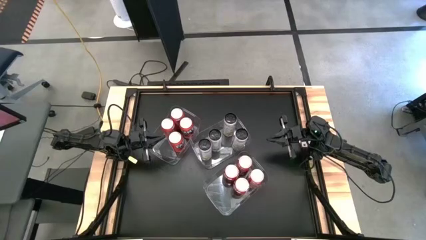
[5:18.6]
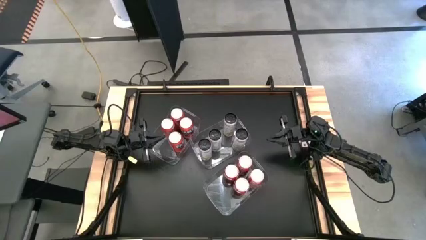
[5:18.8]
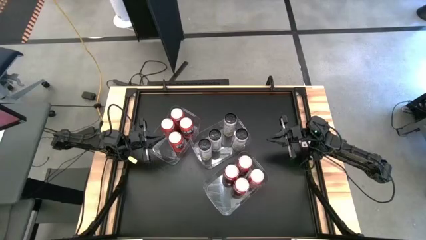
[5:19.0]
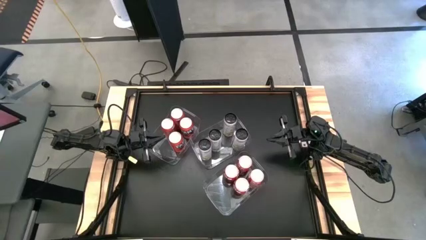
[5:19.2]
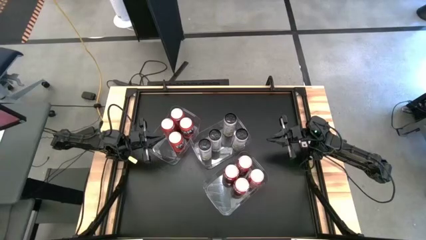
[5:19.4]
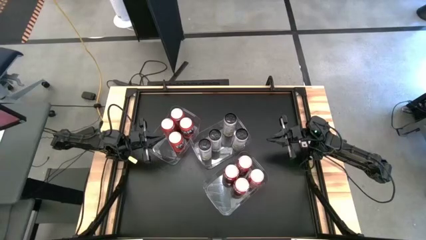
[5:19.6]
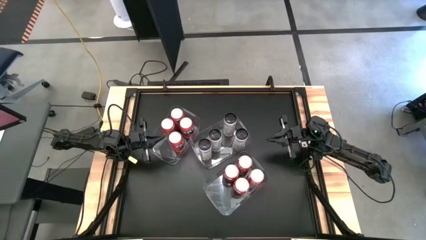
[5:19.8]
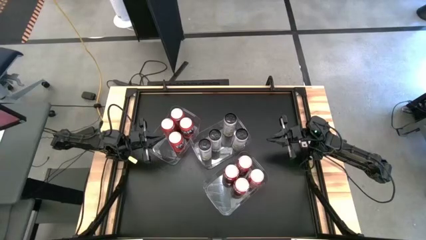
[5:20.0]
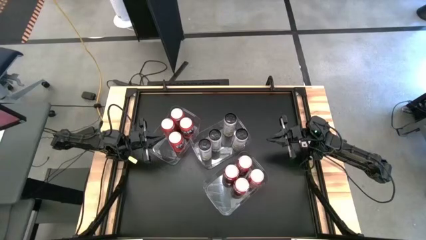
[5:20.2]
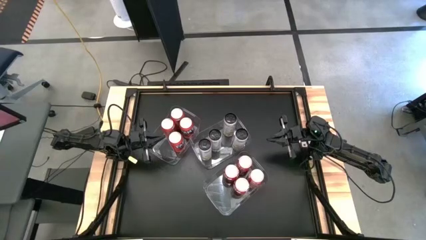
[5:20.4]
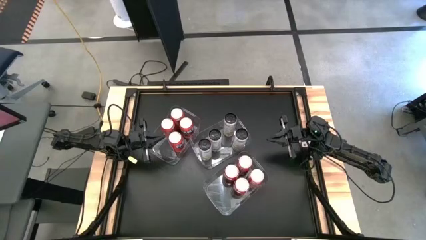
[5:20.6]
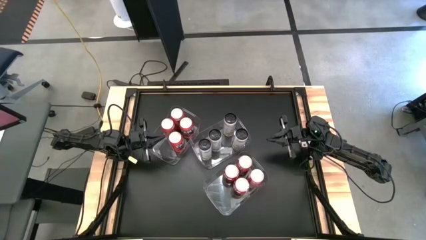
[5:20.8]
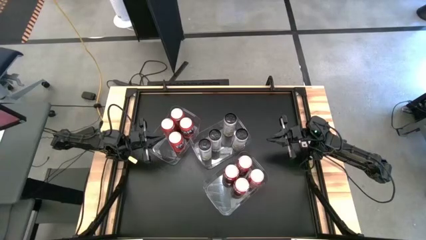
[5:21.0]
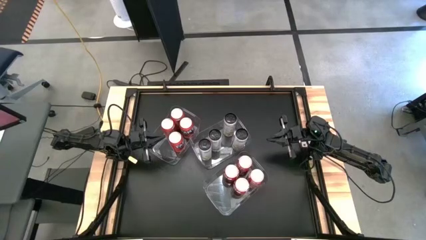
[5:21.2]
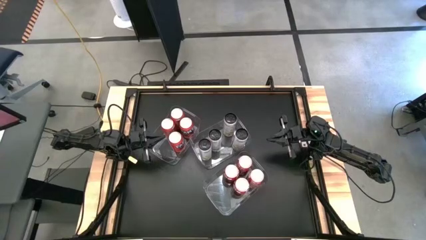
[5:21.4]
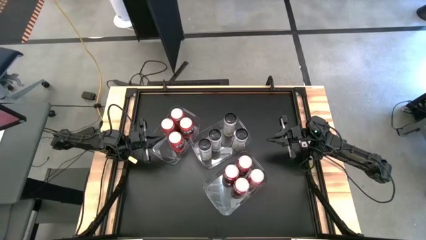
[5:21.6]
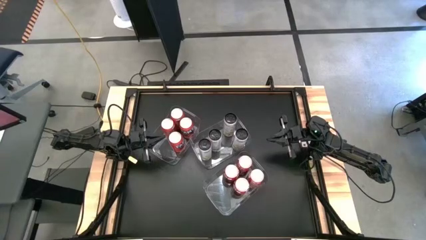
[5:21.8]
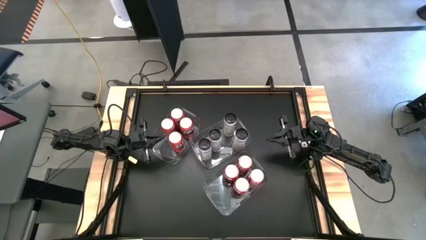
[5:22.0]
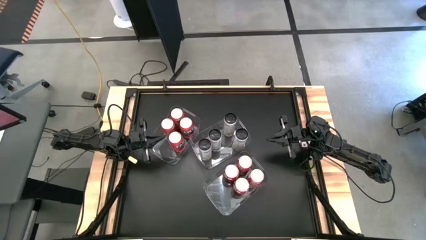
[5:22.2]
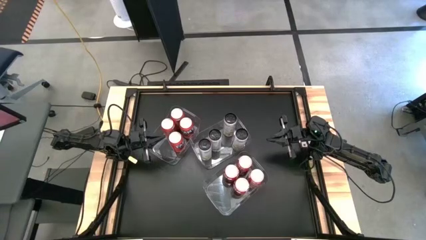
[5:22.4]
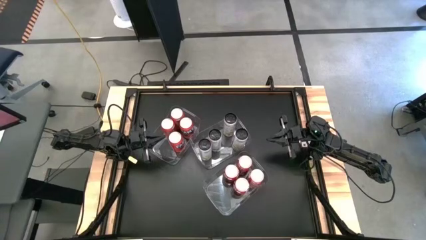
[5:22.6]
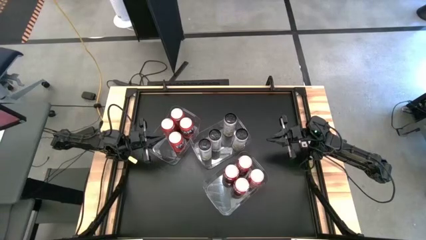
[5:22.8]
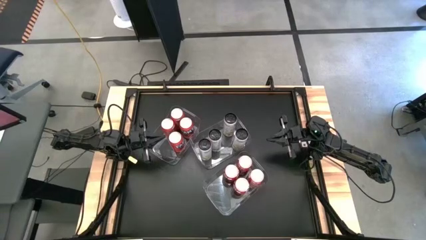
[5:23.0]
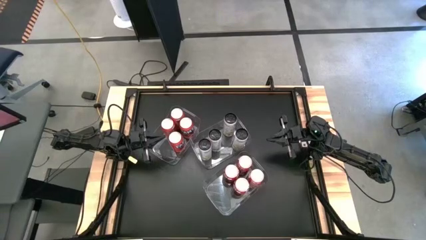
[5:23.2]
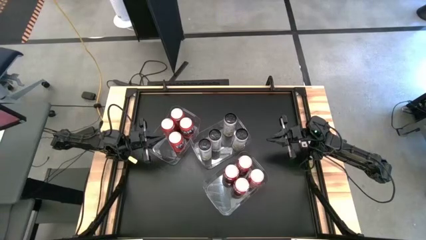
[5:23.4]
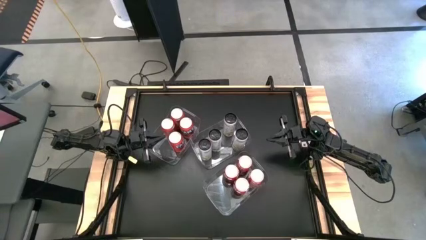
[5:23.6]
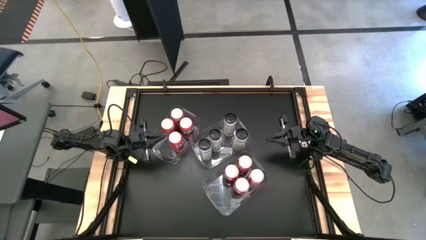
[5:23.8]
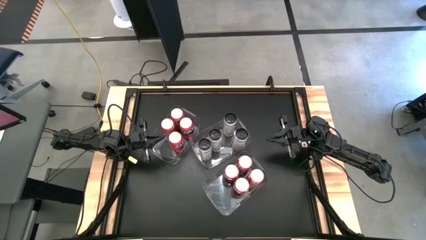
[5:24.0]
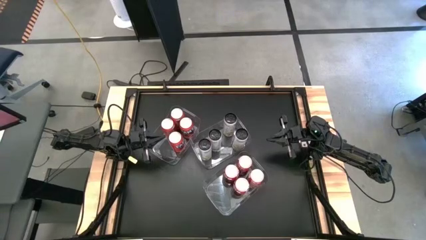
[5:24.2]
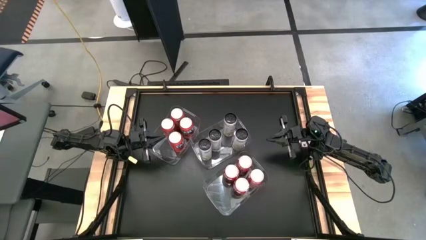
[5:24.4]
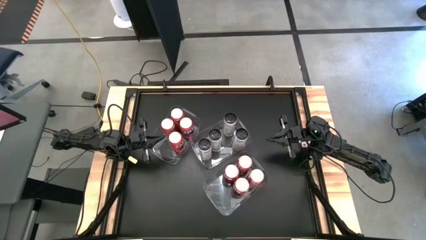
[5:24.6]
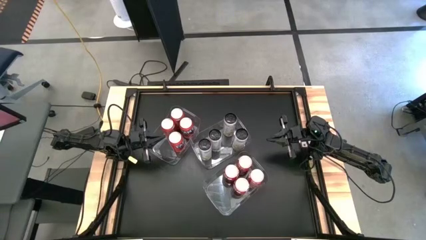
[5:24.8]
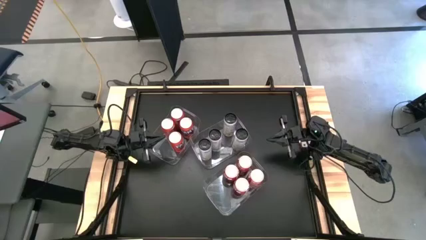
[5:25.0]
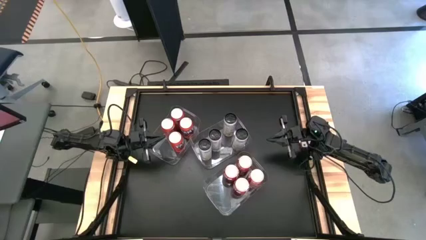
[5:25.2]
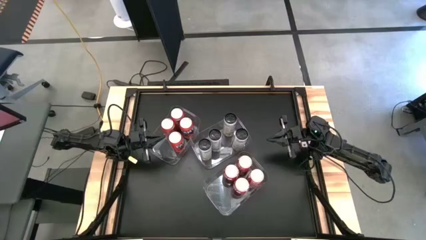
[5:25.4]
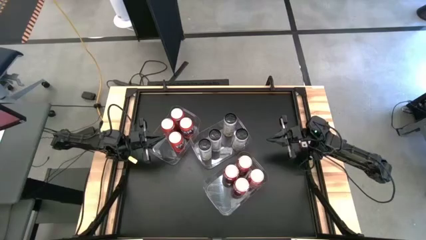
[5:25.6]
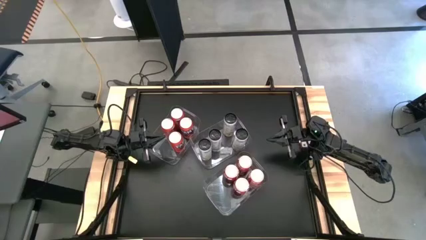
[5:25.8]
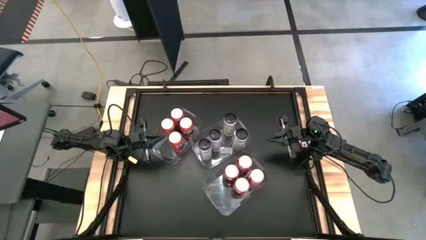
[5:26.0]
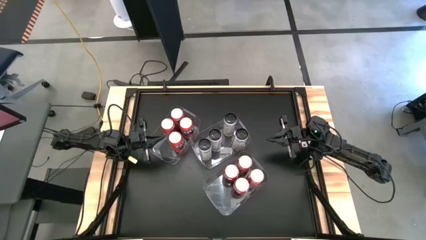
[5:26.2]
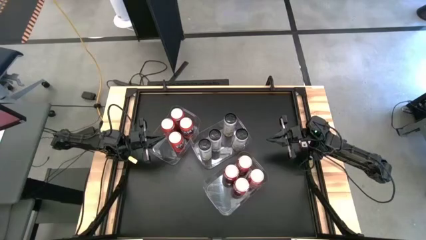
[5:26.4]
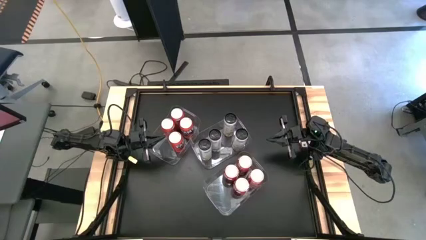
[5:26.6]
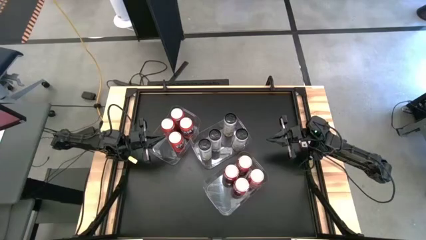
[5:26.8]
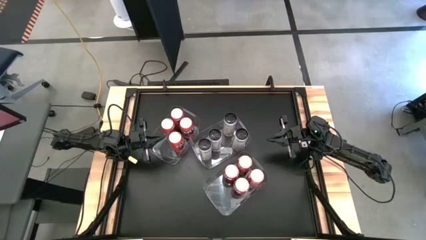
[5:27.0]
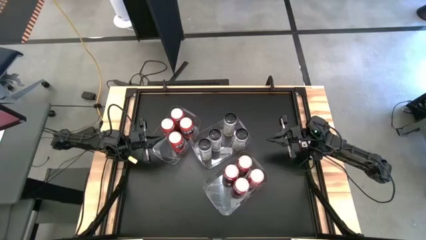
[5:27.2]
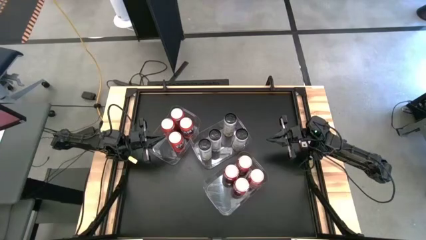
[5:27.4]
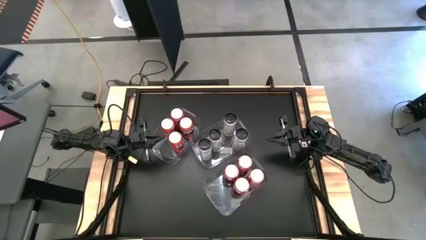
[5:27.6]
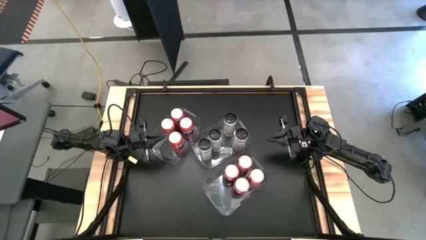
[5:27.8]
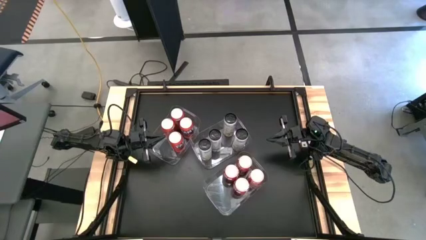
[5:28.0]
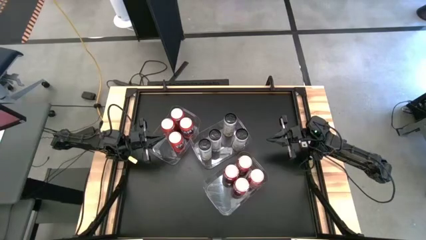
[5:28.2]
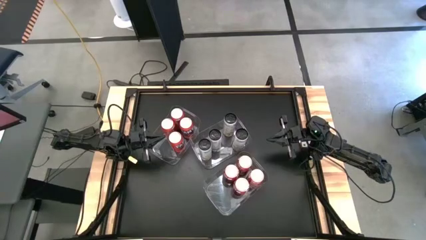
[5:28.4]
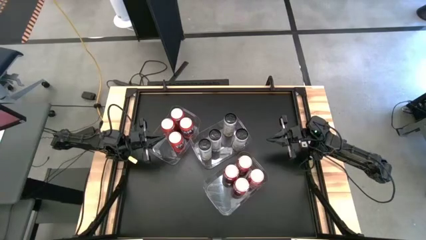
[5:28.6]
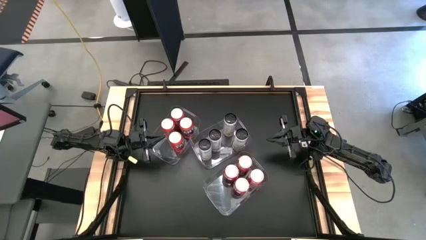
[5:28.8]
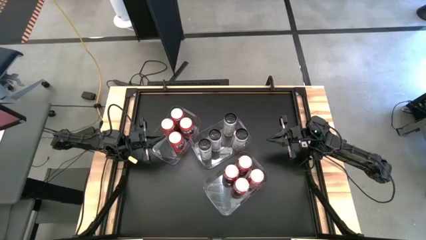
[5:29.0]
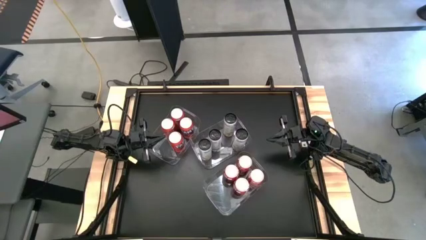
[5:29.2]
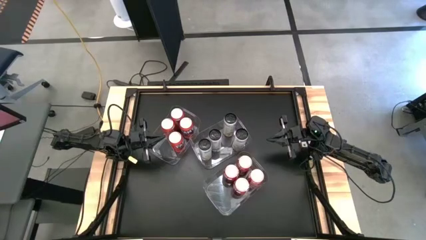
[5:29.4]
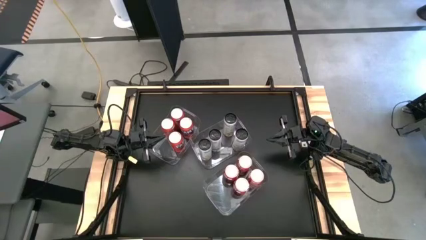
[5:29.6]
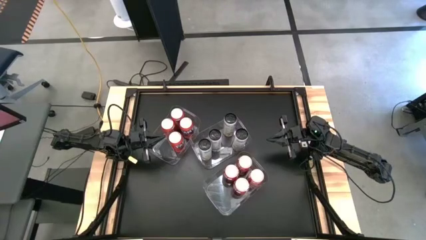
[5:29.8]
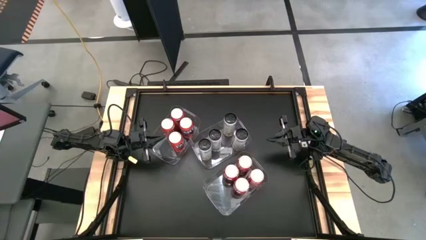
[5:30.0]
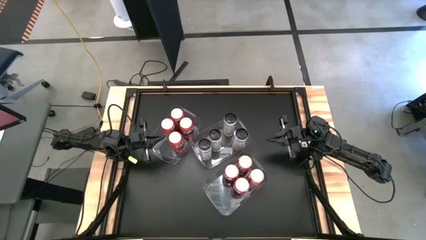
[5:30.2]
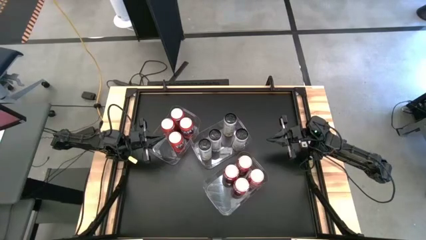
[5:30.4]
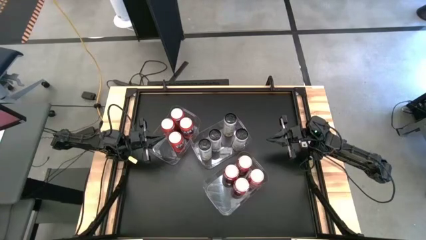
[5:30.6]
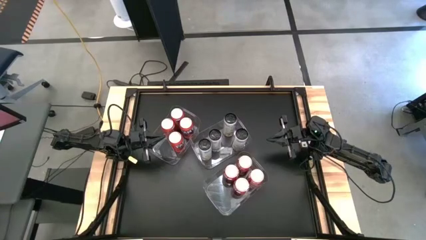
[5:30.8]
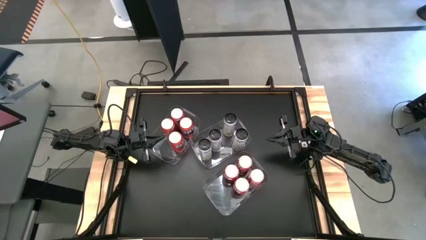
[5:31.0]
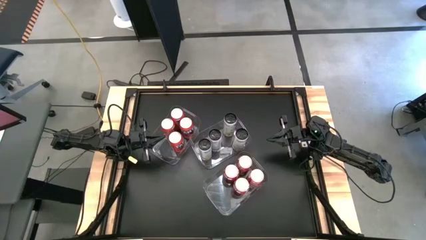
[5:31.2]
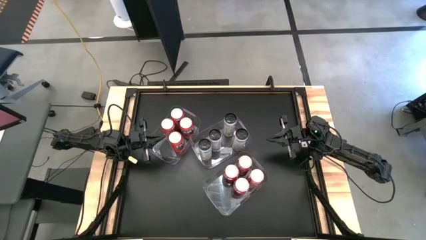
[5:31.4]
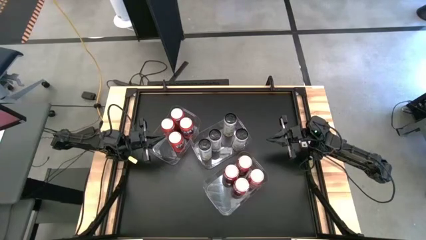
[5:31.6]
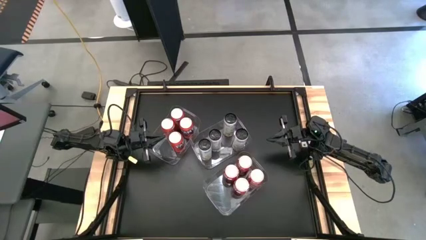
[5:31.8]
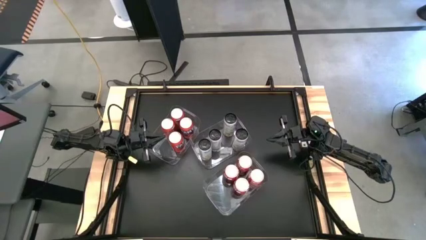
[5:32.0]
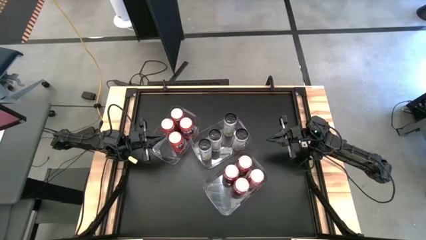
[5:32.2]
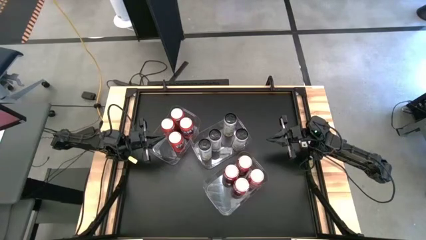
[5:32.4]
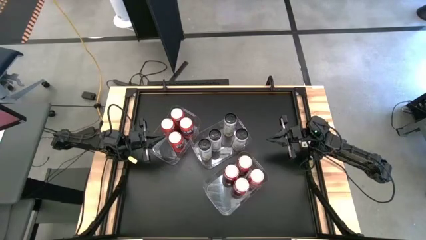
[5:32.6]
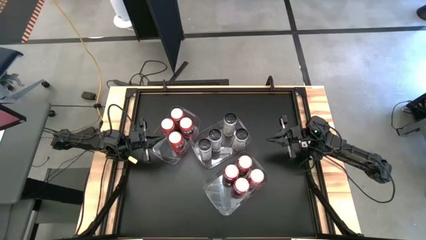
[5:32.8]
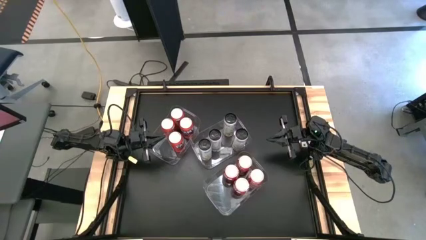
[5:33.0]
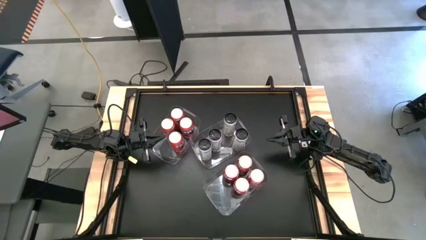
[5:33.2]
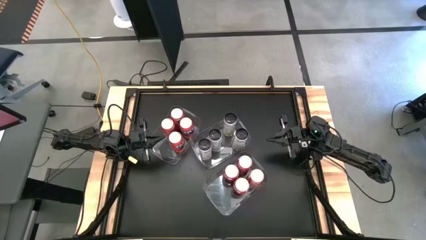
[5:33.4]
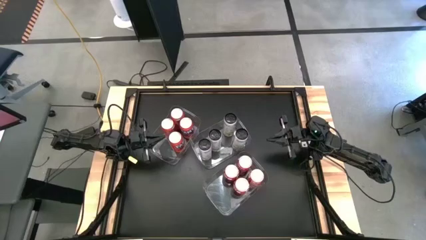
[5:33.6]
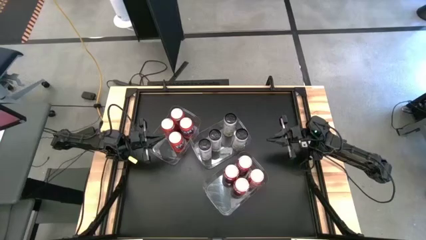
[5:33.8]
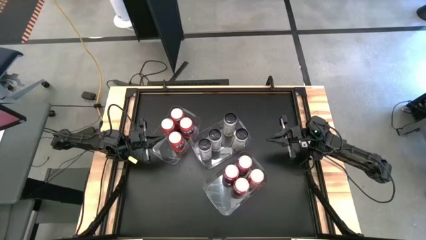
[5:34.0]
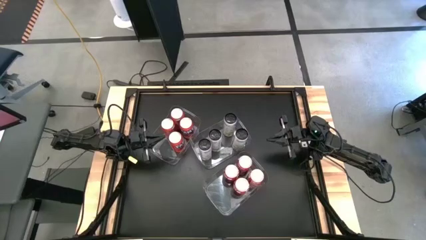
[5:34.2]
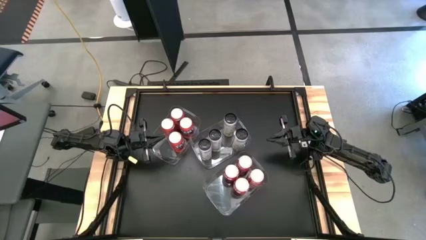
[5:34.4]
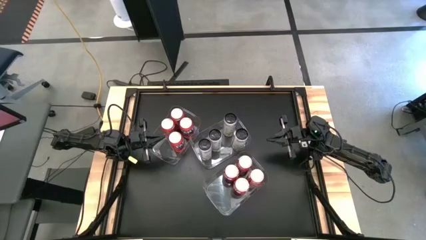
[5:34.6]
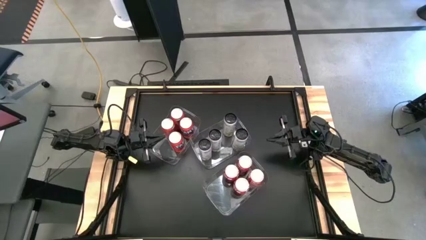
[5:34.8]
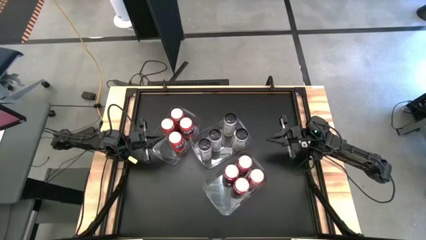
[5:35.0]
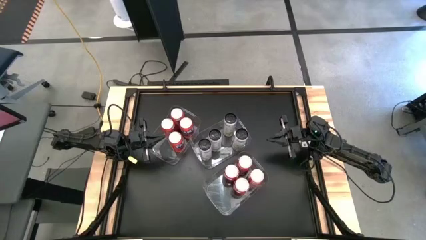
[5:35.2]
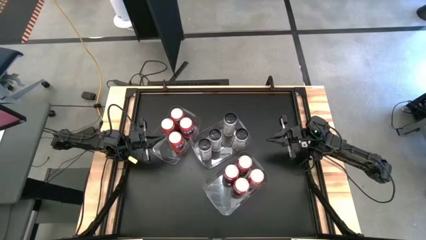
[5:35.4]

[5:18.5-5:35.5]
Task: Sort soda cans
Return to Home Position
